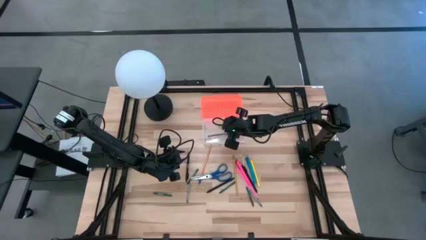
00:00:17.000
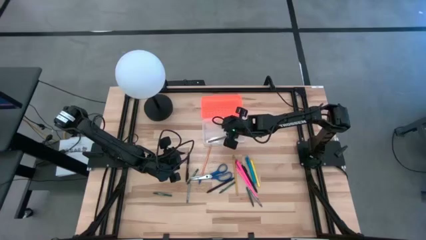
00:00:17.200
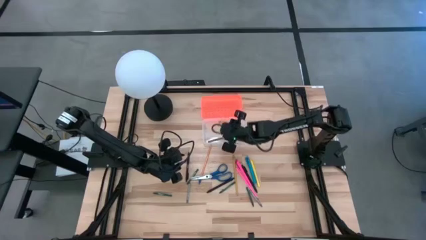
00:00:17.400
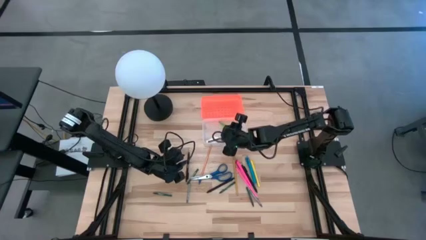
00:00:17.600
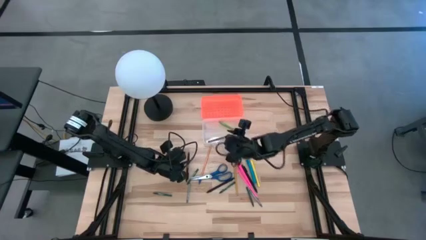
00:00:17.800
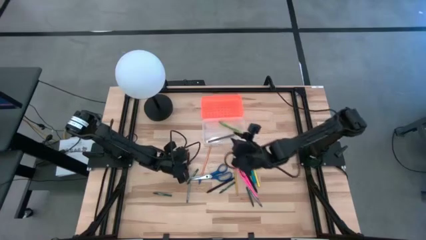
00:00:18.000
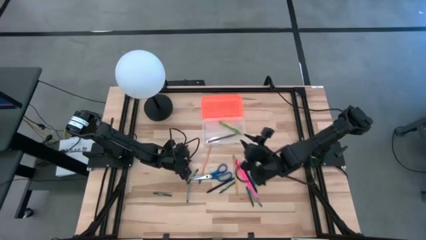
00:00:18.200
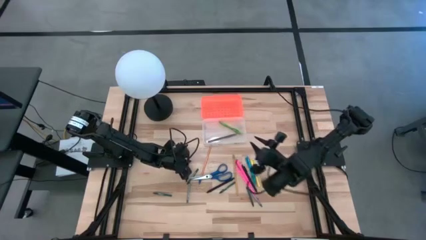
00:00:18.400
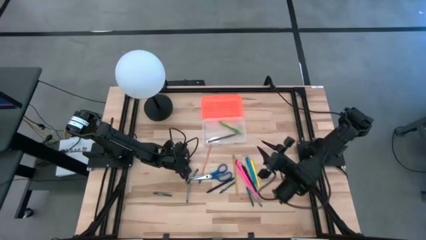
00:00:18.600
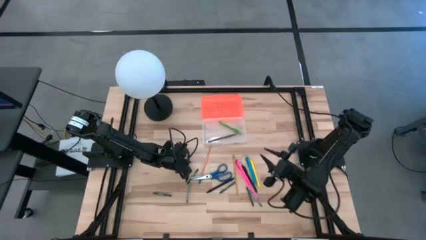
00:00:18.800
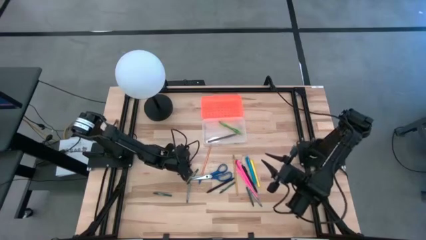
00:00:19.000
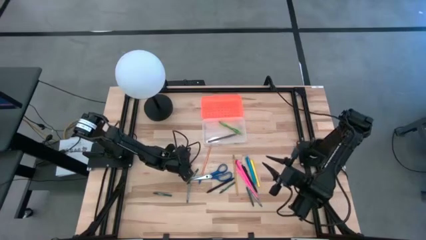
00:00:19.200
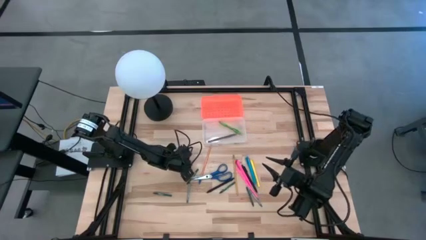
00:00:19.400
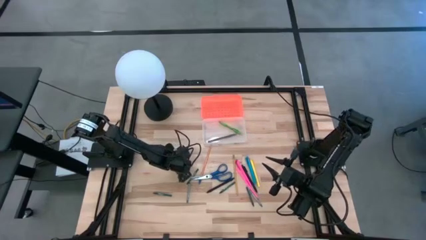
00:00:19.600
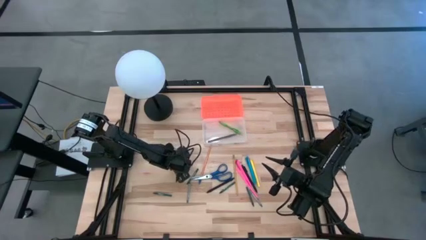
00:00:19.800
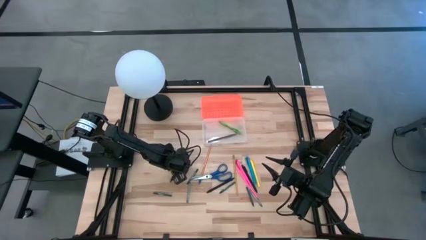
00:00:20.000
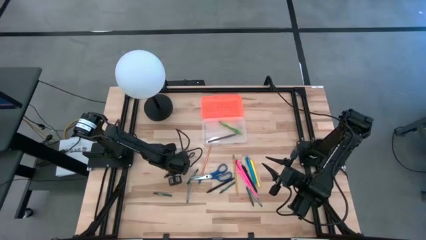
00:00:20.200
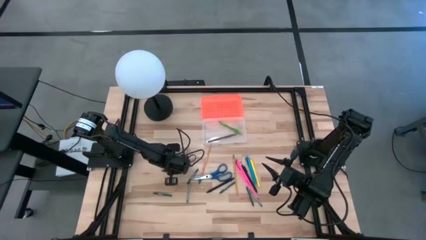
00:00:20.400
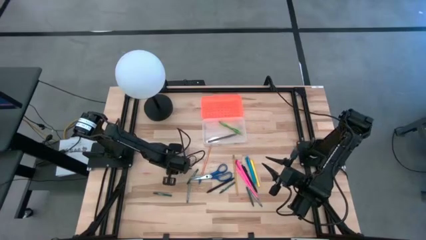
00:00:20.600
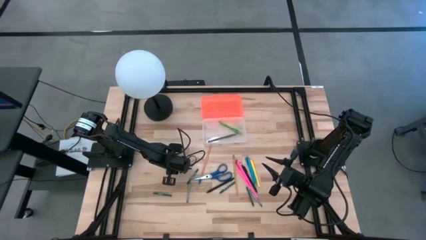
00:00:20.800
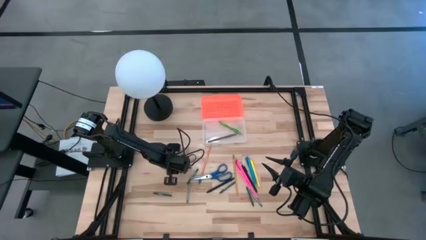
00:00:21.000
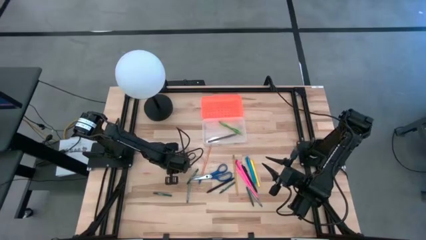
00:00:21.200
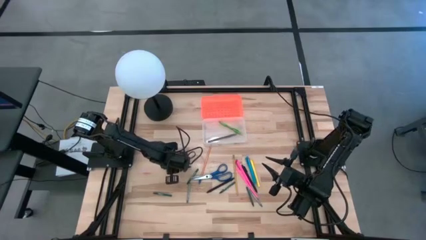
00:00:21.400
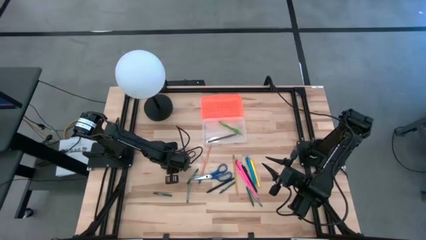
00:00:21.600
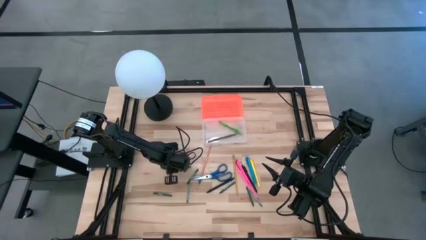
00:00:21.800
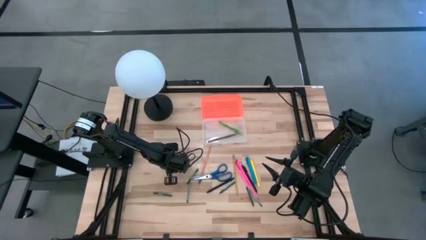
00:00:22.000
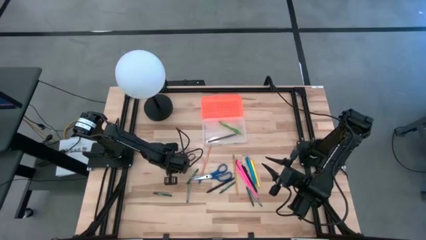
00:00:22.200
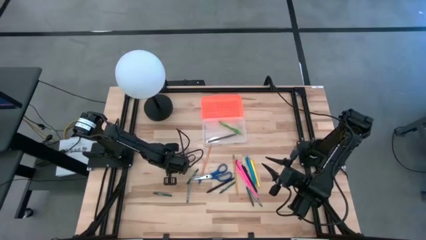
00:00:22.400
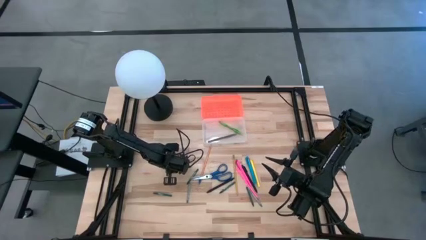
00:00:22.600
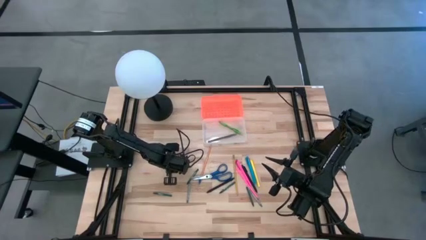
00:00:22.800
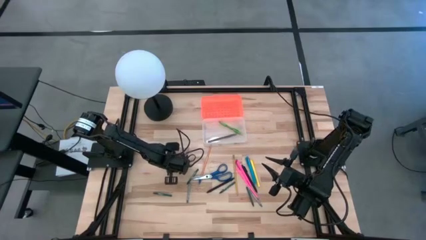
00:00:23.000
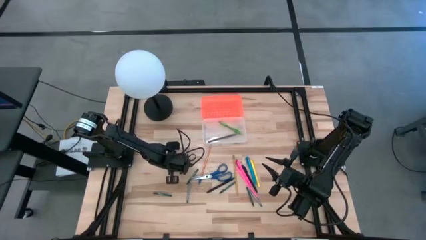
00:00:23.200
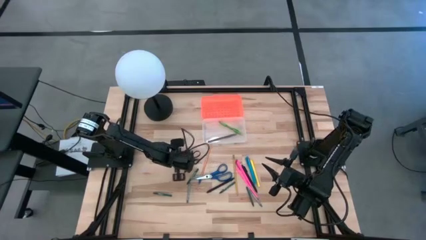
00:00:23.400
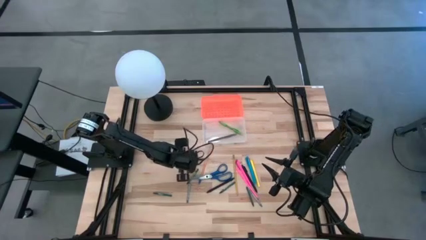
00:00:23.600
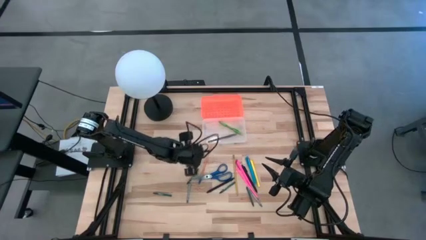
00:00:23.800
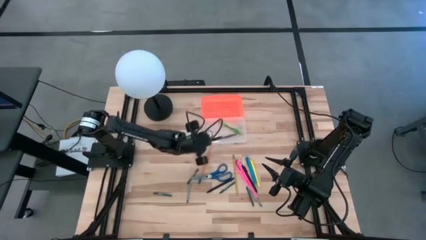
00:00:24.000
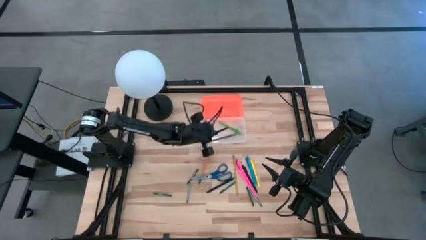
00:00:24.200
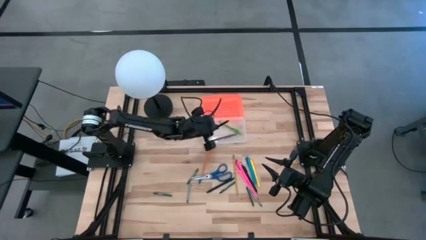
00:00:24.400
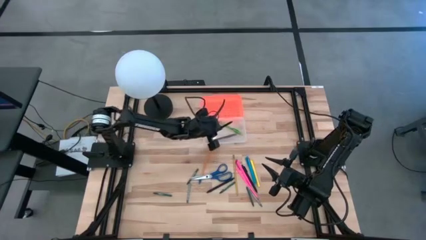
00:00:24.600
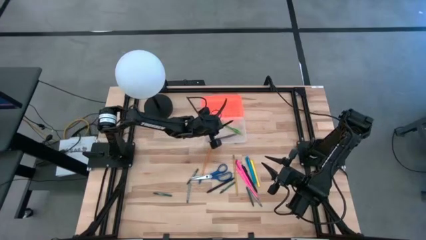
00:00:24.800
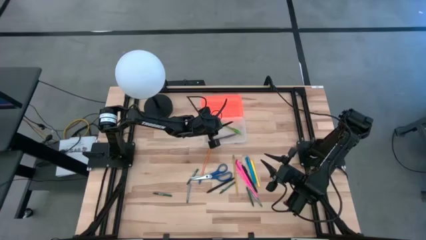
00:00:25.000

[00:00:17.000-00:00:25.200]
Task: Pick & place school supplies into a supply box
Put the black pen into the orange supply box

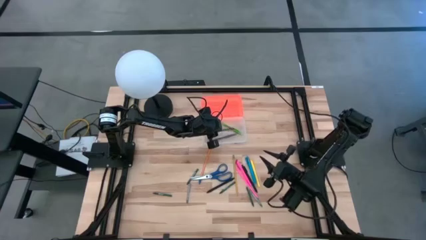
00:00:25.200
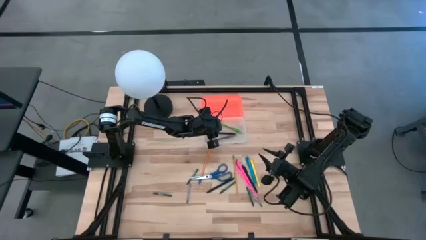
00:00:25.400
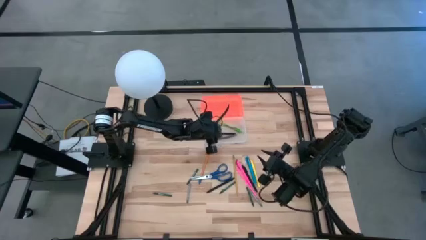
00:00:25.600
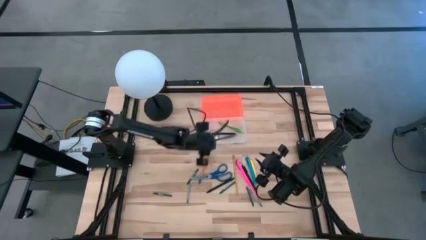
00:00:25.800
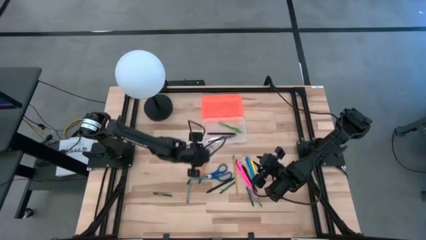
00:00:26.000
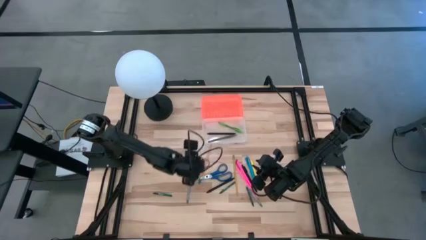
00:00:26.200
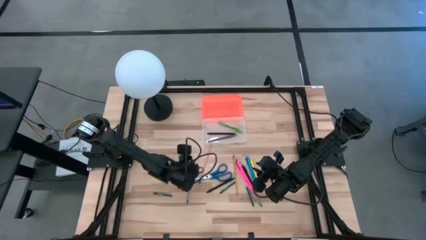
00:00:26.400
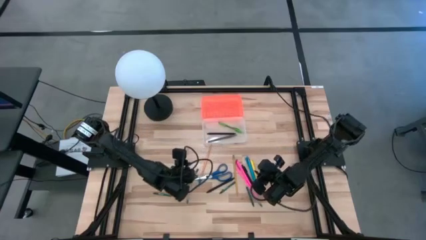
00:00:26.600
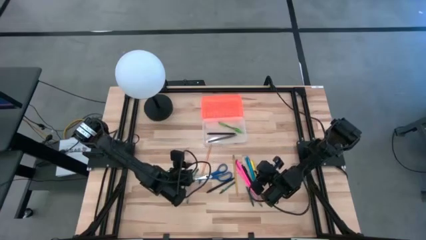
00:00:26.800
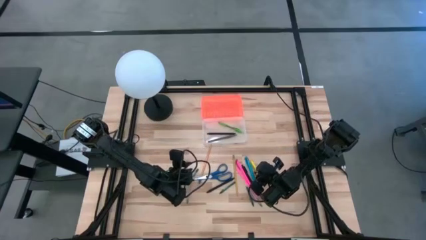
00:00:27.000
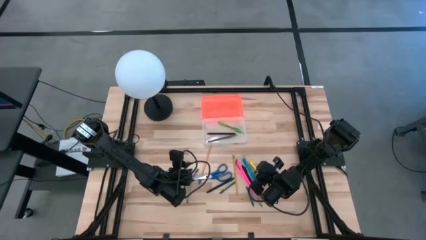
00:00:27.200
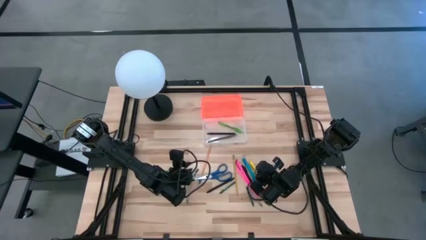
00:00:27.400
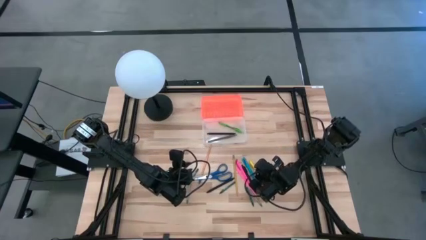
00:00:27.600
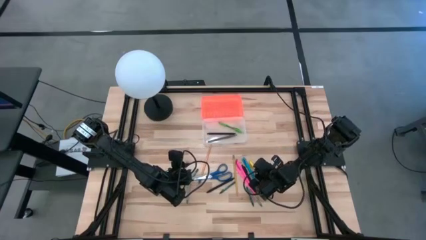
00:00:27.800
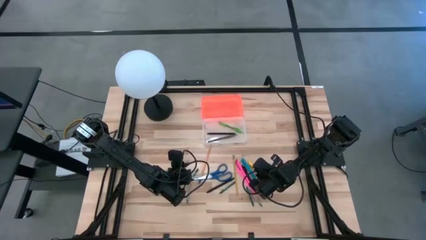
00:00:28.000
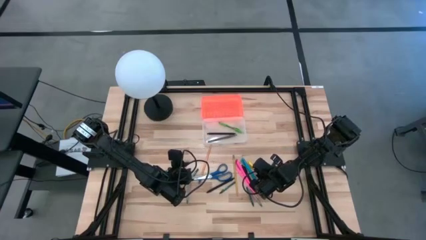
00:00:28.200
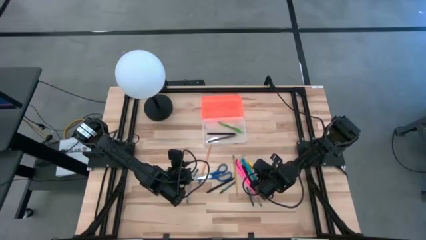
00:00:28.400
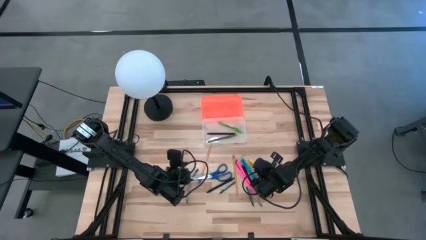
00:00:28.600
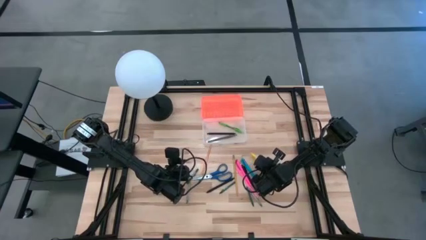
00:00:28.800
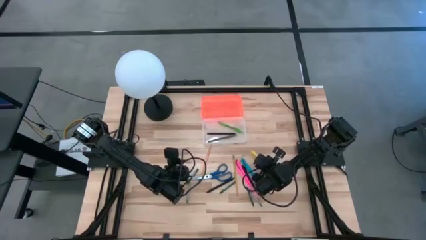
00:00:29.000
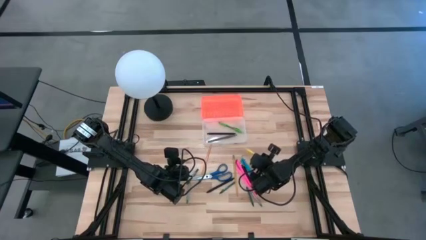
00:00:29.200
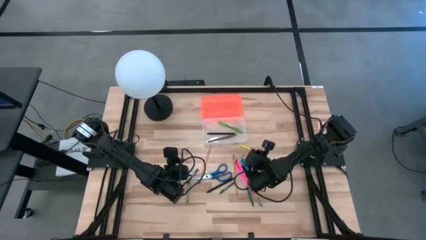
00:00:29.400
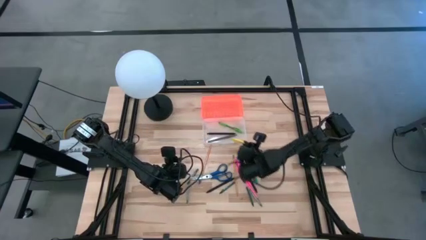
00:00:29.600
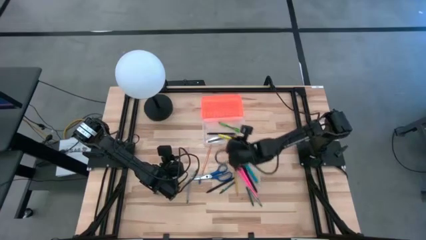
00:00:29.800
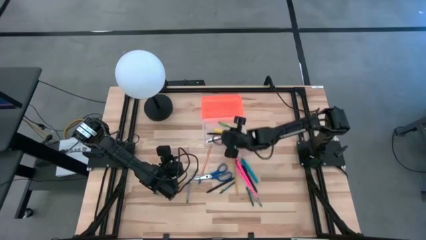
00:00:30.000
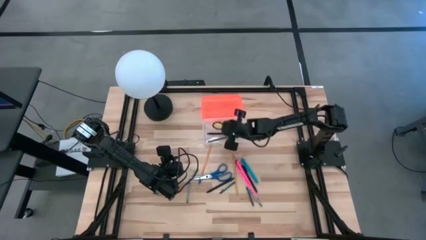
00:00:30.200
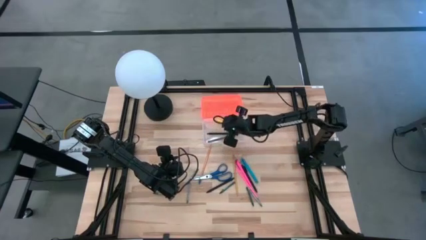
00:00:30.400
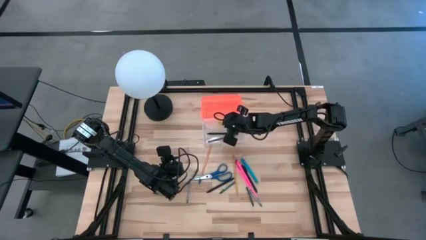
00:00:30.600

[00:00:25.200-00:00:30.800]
Put the yellow pen into the orange supply box

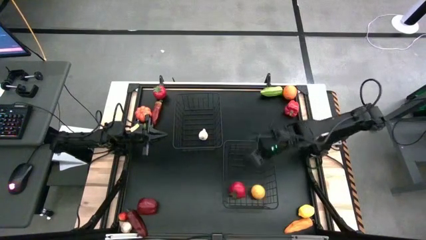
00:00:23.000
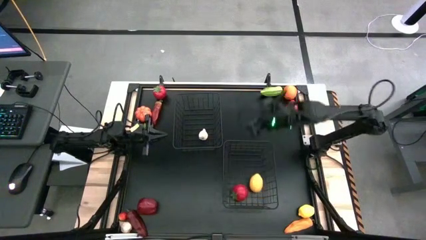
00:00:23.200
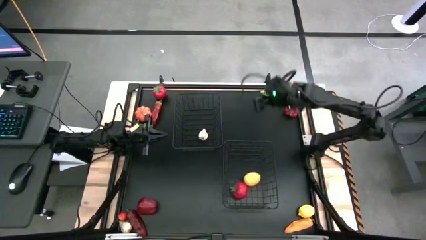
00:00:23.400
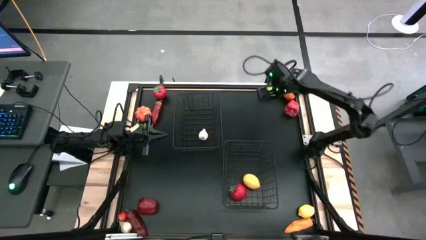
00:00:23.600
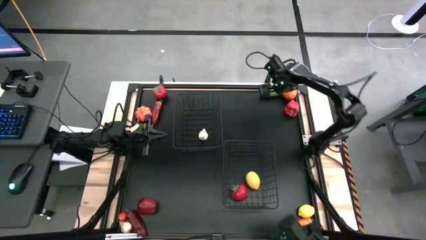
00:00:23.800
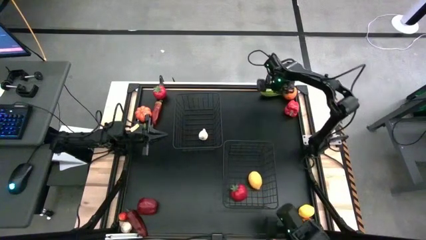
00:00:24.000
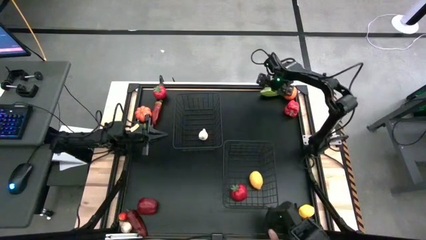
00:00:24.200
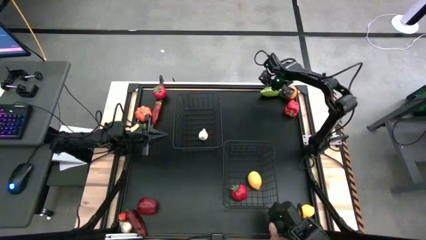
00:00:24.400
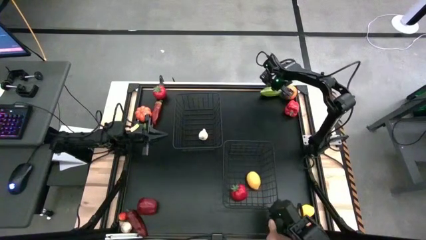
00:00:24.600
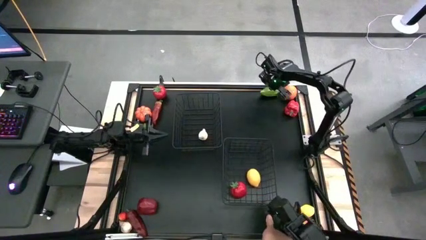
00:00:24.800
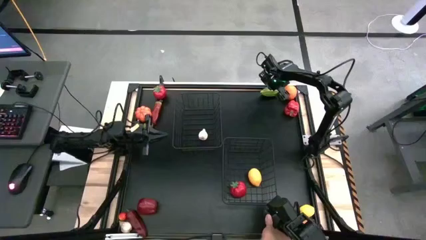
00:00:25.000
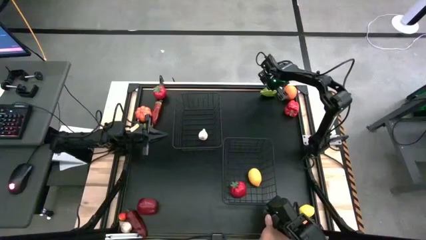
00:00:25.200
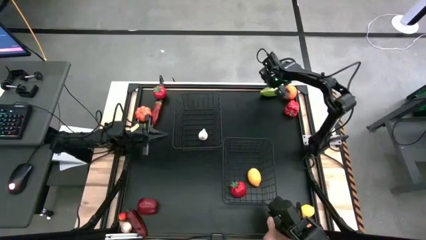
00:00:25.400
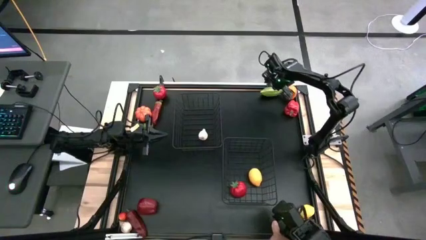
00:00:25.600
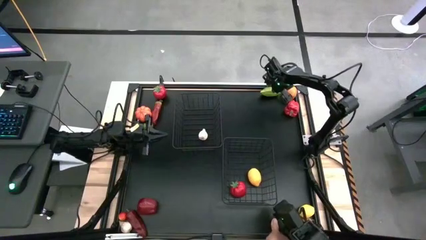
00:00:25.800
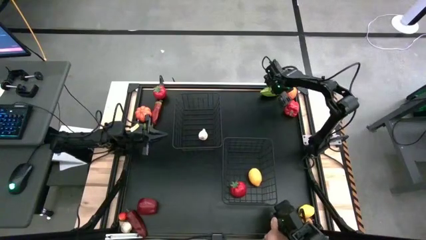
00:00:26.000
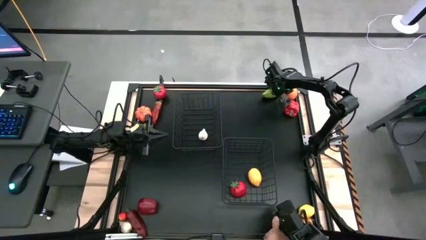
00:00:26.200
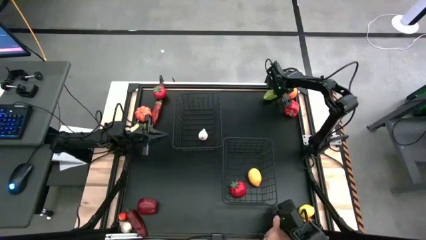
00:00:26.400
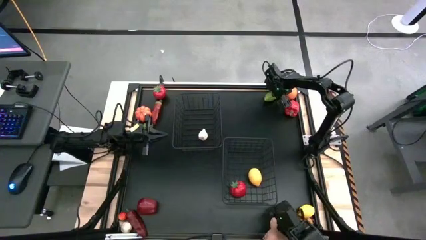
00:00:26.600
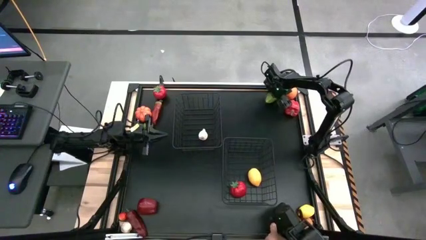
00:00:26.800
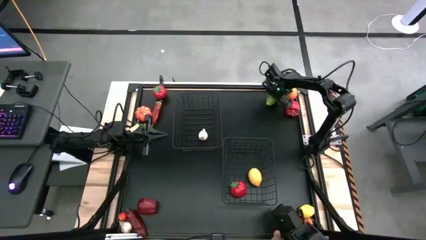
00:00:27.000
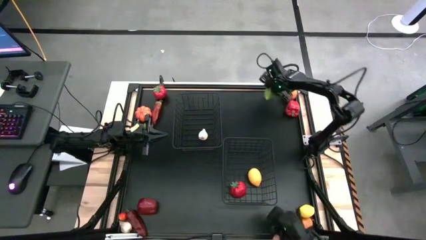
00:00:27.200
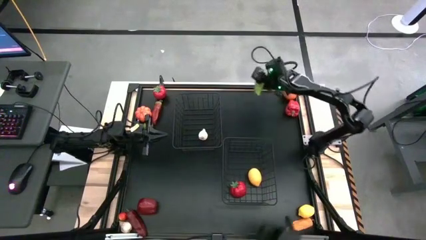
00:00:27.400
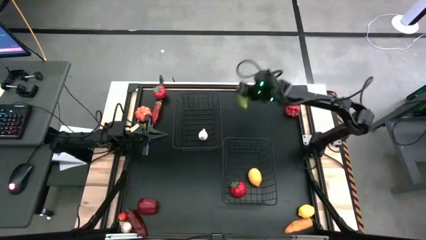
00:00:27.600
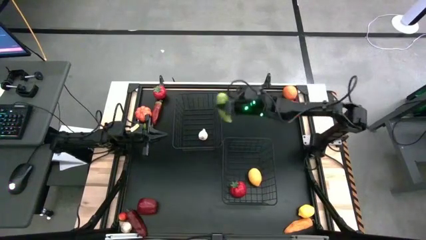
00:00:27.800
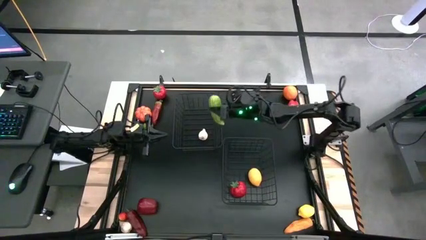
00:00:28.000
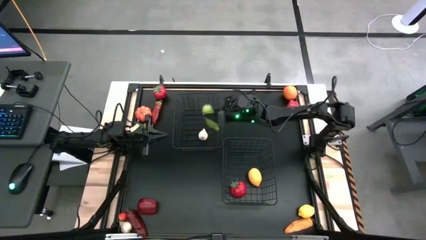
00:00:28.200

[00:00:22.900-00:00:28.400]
Task: Sort produce into baskets
Put the green bitter melon into the top black wire basket
